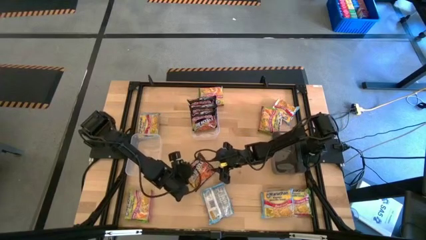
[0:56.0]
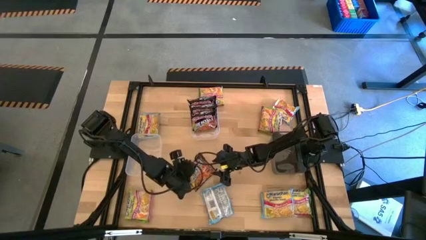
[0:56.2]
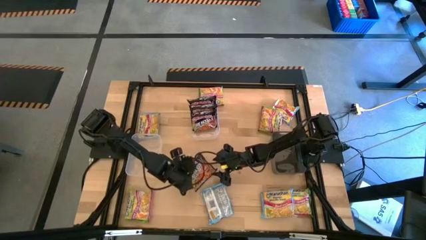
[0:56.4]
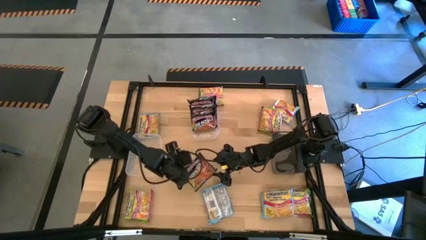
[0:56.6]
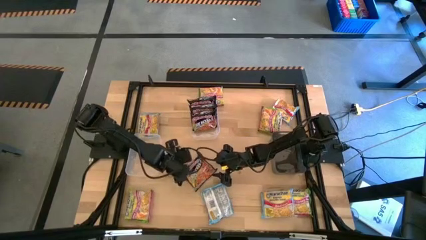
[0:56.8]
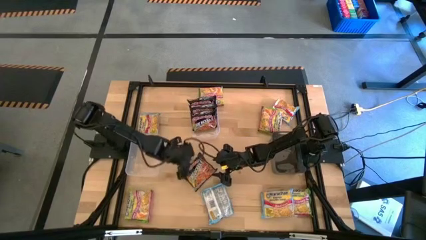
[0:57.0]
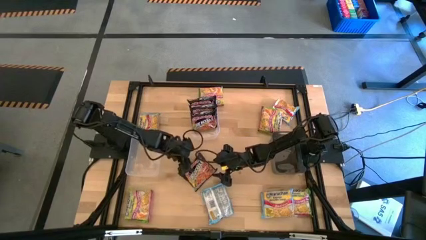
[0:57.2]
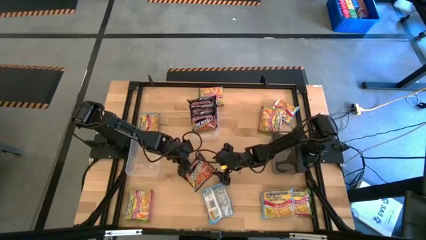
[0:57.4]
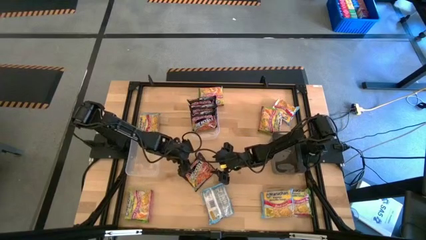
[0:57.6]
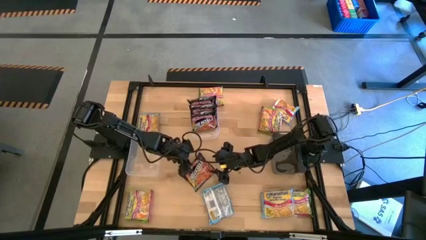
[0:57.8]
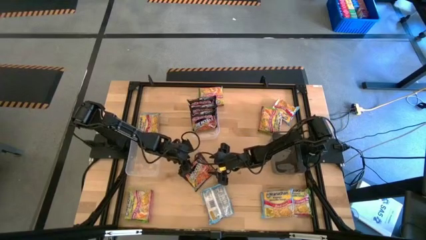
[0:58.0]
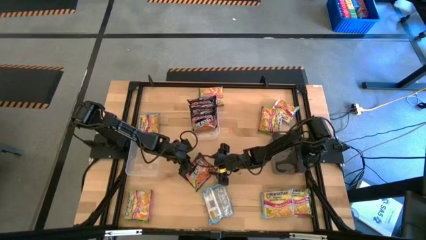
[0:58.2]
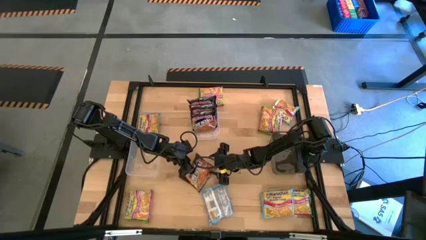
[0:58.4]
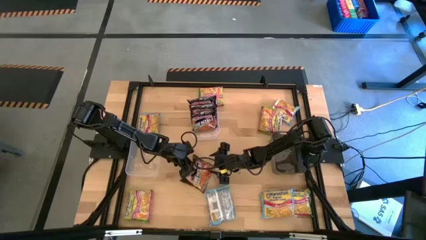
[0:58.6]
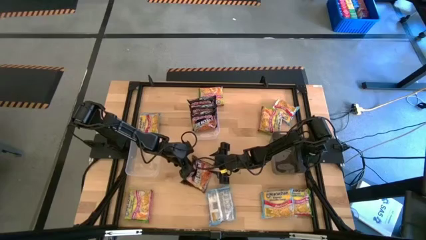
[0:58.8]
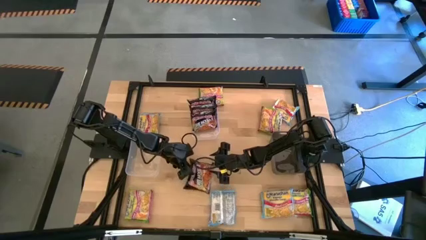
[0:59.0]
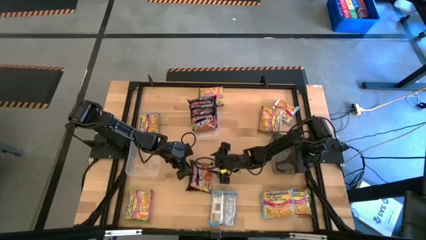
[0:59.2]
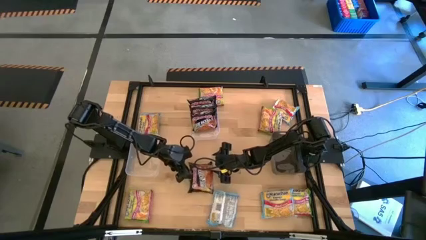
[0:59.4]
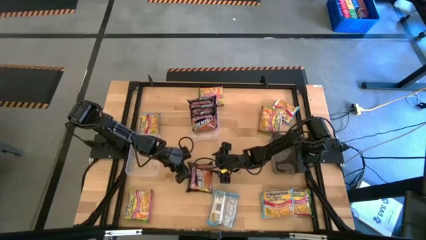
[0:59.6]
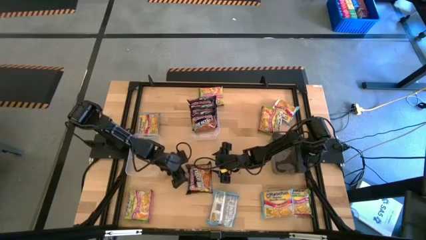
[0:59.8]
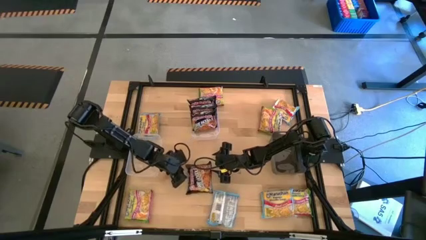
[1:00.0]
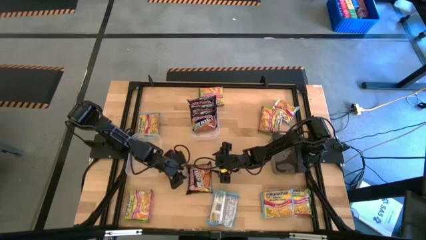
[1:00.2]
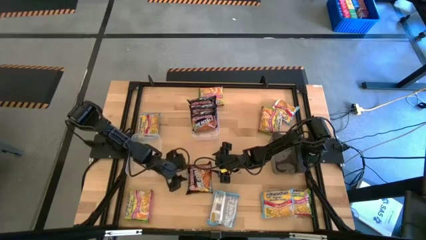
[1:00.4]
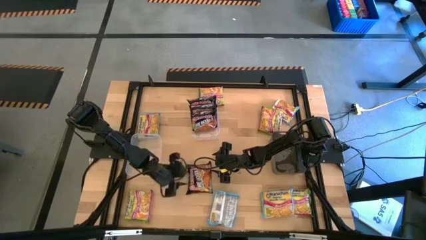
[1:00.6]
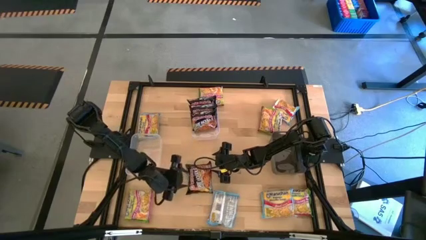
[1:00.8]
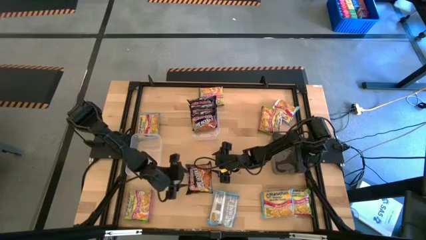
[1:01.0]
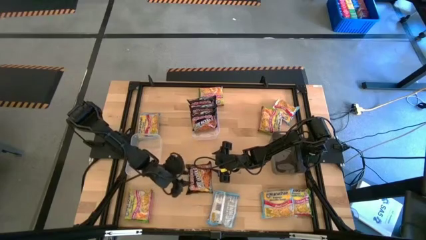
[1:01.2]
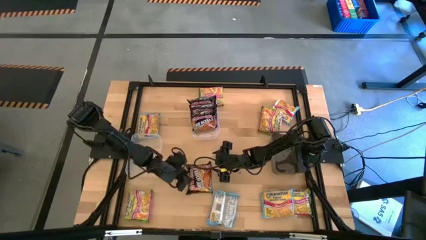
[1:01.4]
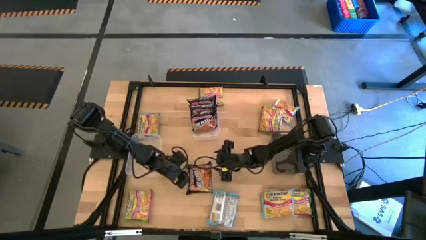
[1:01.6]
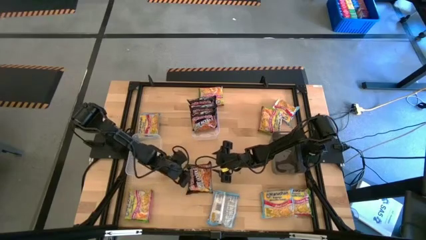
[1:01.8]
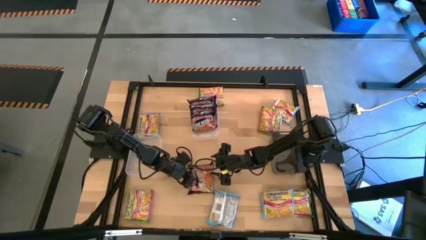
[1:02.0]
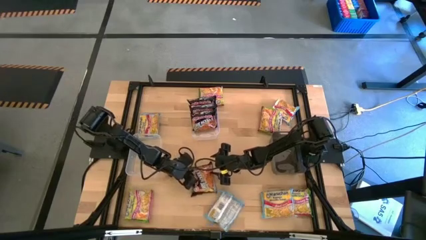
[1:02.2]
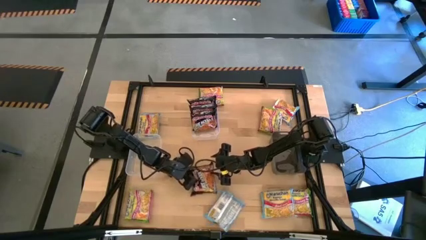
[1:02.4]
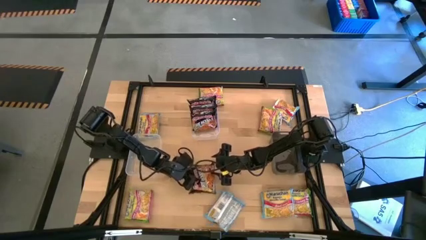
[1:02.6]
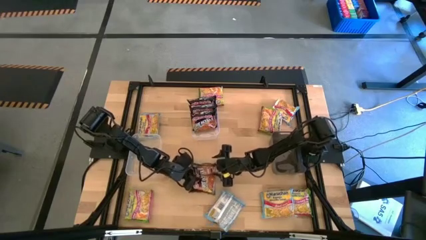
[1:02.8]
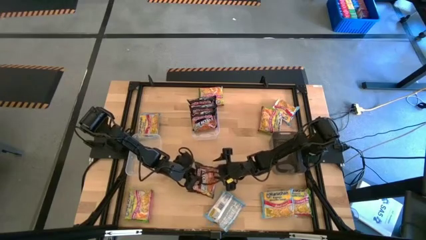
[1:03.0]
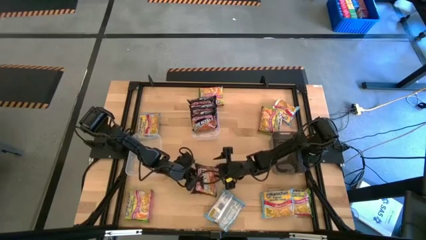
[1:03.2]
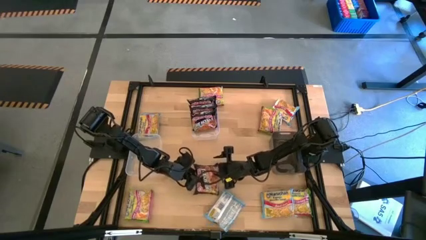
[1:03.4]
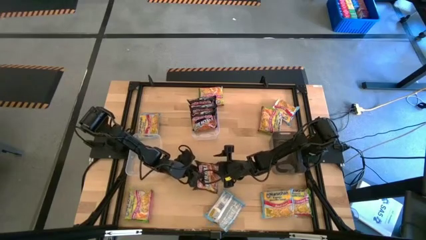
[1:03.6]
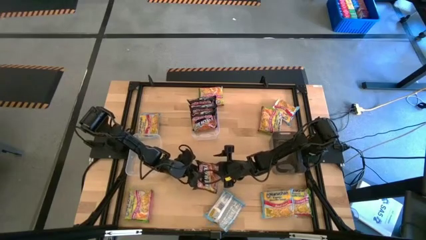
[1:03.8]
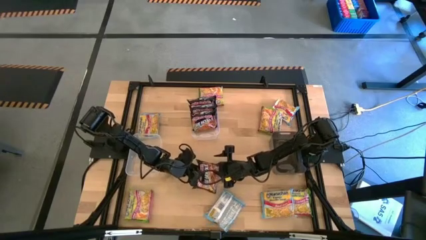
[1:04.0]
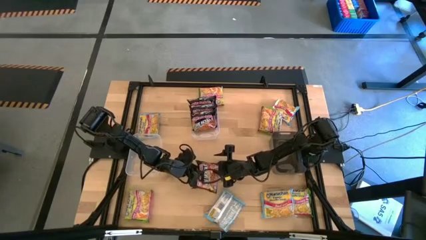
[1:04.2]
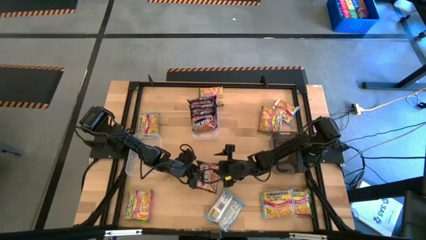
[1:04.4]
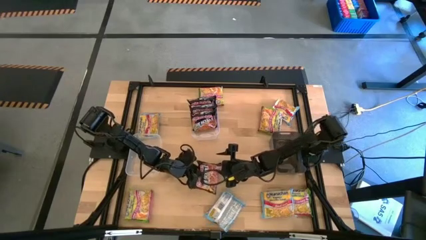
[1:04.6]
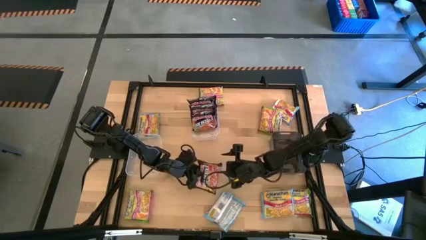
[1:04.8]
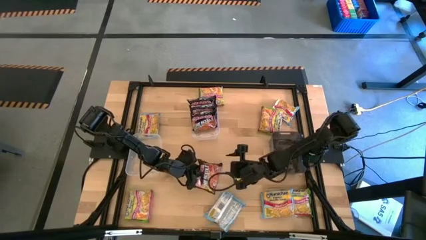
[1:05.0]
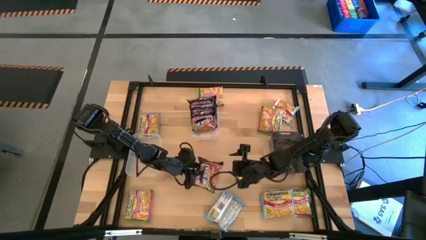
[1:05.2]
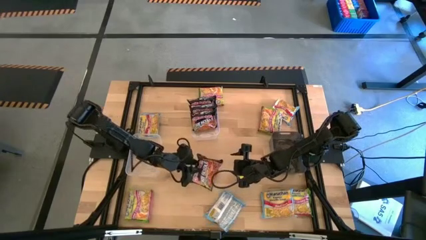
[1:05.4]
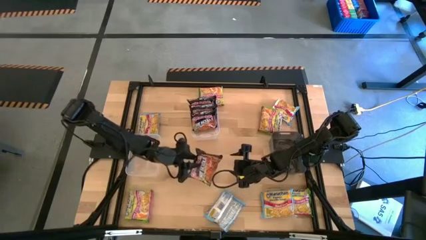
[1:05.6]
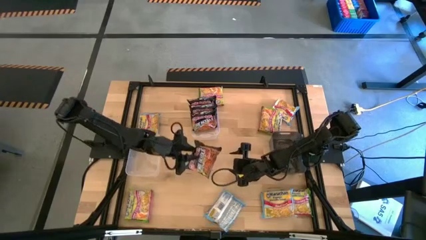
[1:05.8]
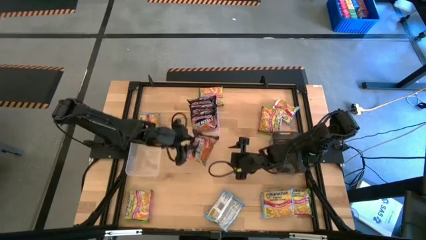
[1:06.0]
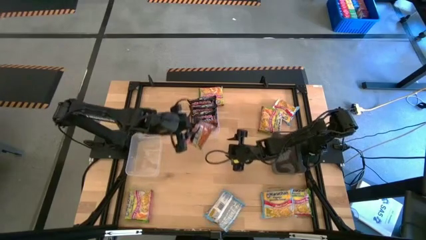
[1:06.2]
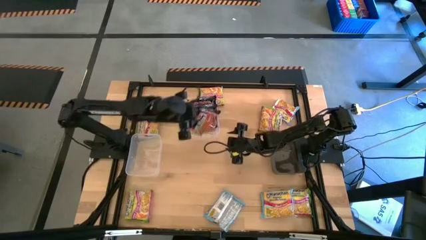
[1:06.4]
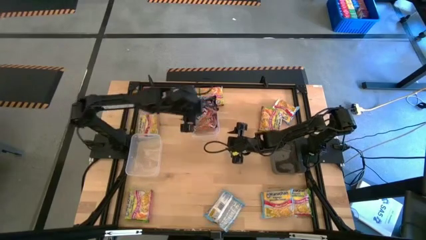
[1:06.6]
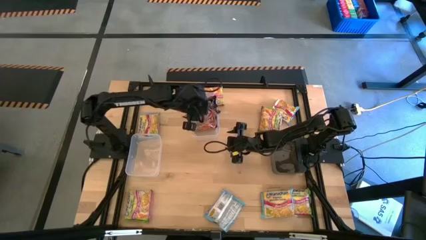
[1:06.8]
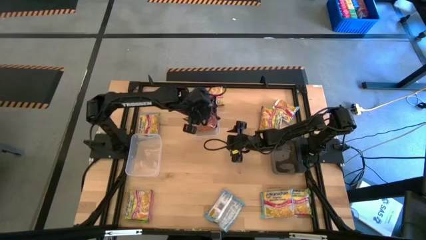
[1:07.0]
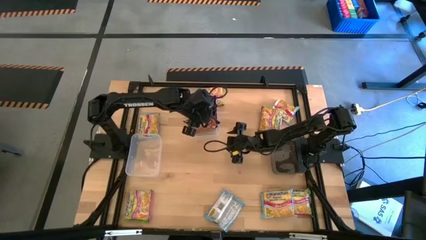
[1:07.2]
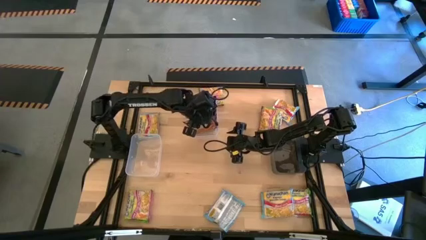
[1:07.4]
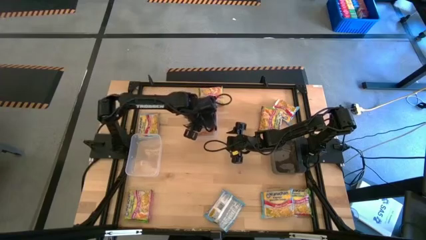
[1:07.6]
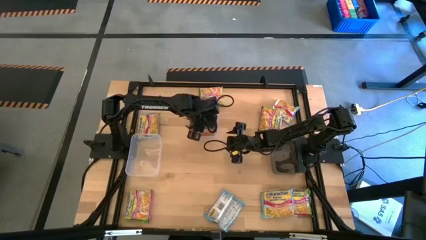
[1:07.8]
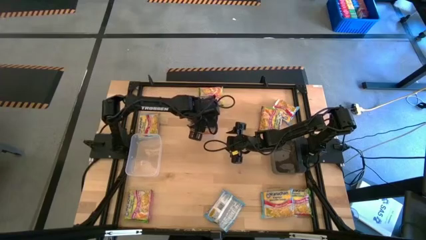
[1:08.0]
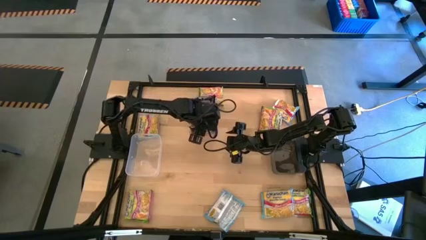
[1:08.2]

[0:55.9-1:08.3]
Task: Sort Maruchan noodles
Put the black noodle pack into the right transparent bin

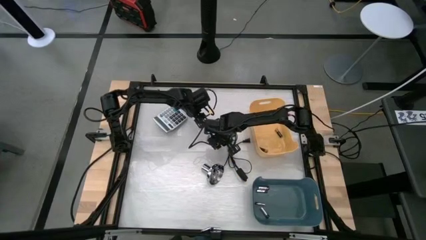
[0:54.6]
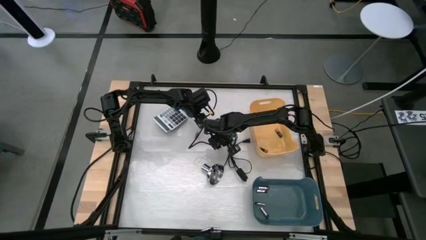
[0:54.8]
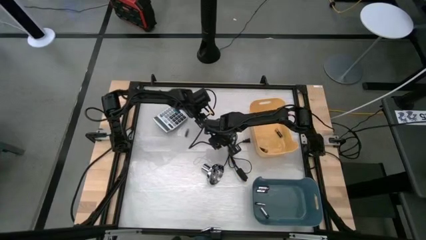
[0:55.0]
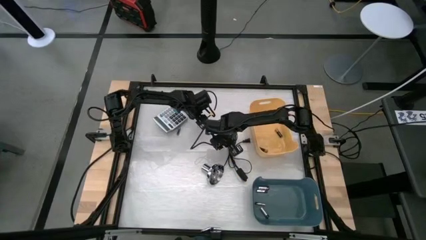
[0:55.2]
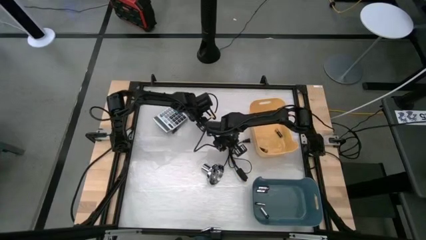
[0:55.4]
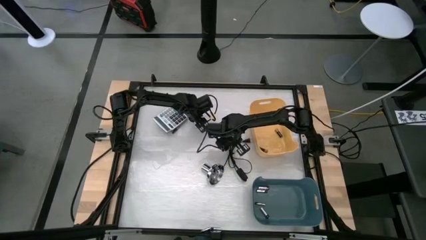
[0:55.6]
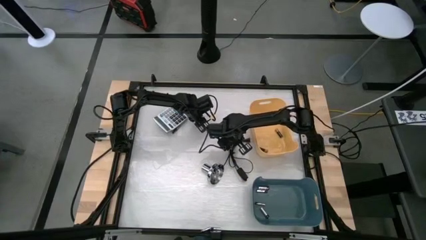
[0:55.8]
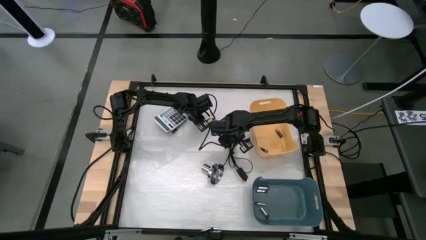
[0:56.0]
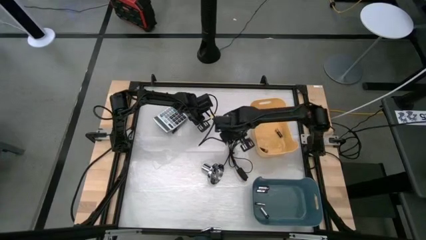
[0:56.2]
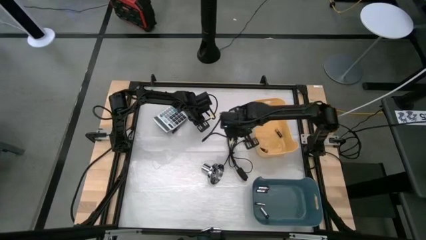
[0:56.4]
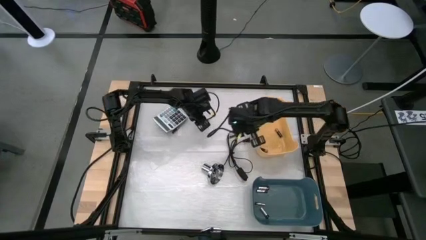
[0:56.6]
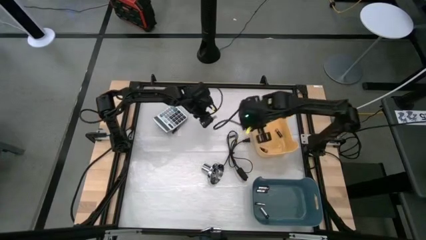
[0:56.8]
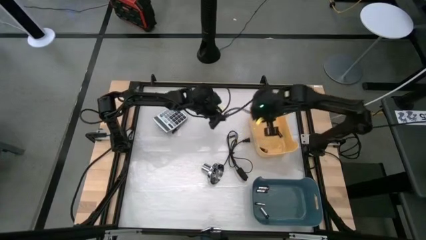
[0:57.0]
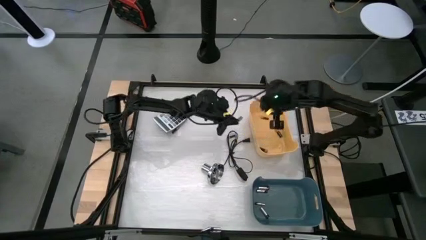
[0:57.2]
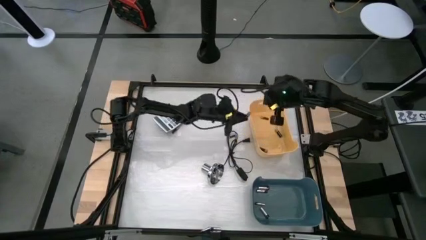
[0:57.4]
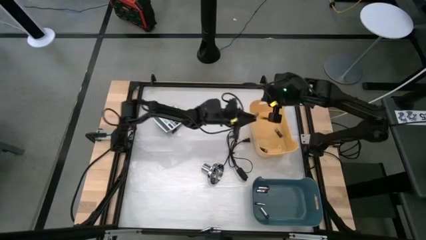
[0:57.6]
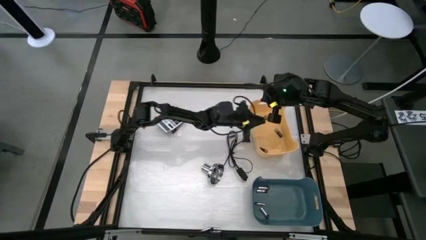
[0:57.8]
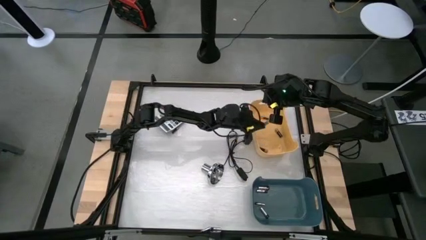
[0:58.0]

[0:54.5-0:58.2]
Task: Sort batteries
Put the black battery into the yellow bin
